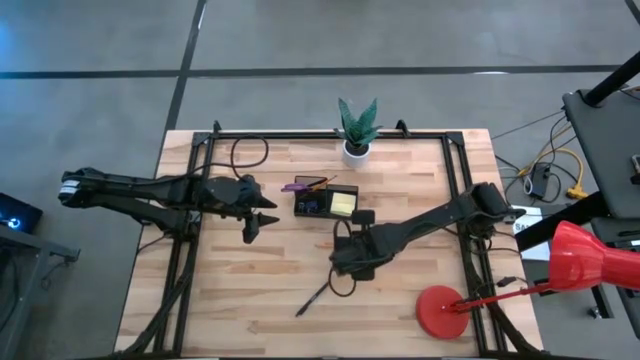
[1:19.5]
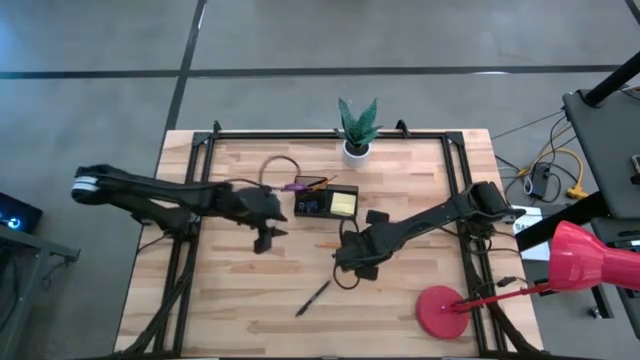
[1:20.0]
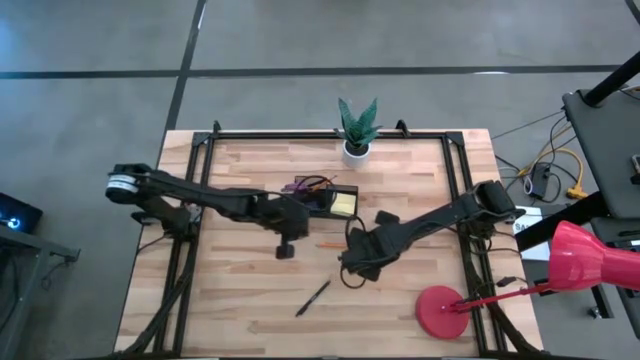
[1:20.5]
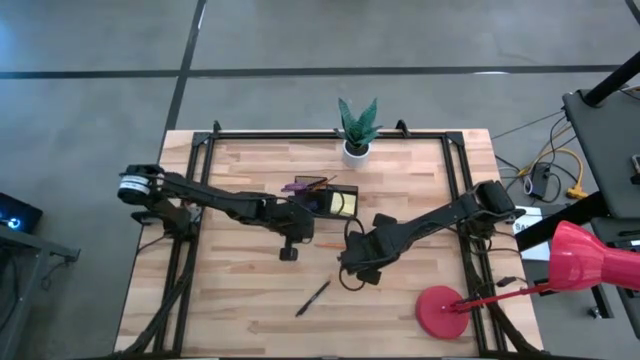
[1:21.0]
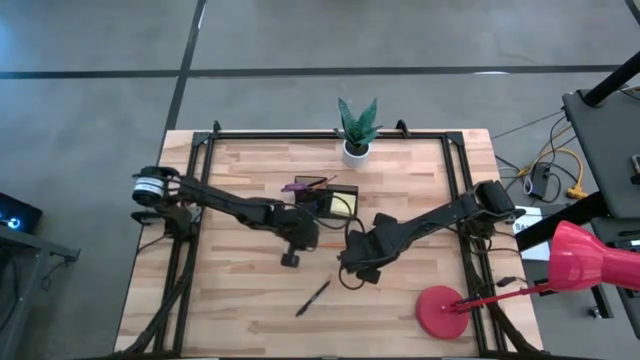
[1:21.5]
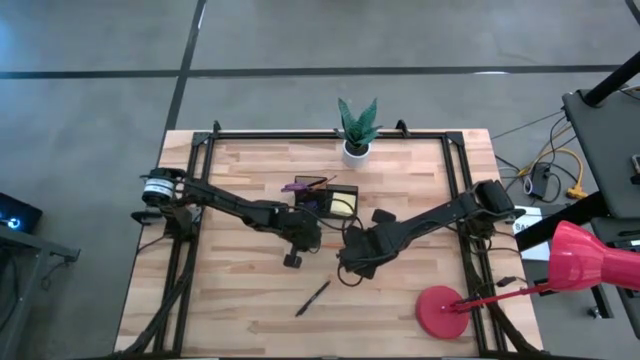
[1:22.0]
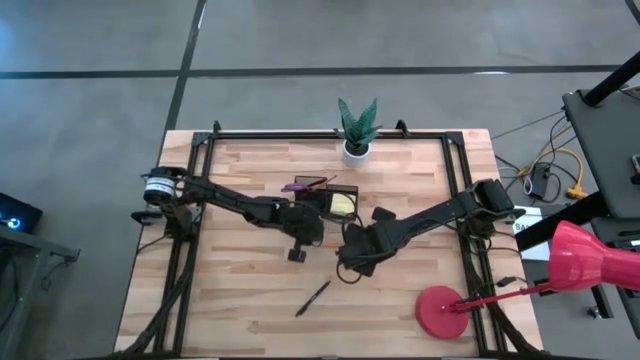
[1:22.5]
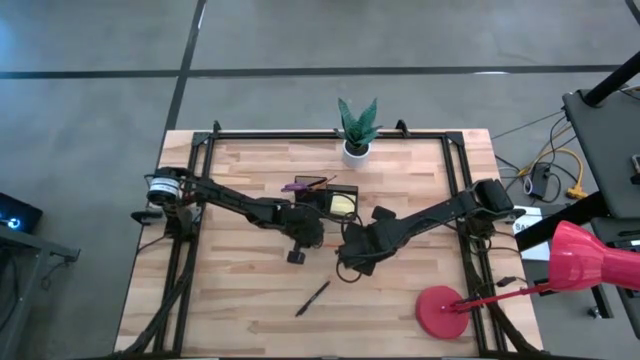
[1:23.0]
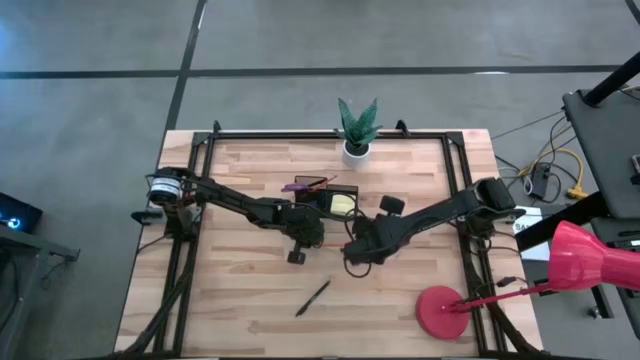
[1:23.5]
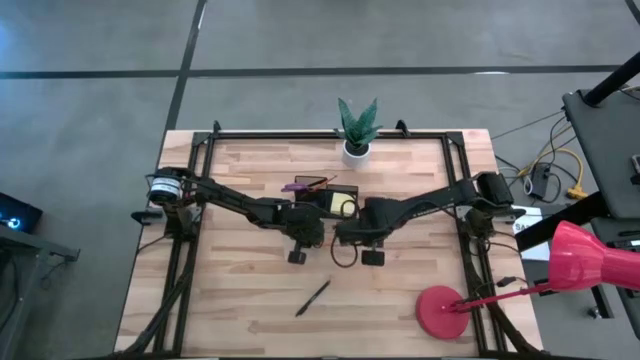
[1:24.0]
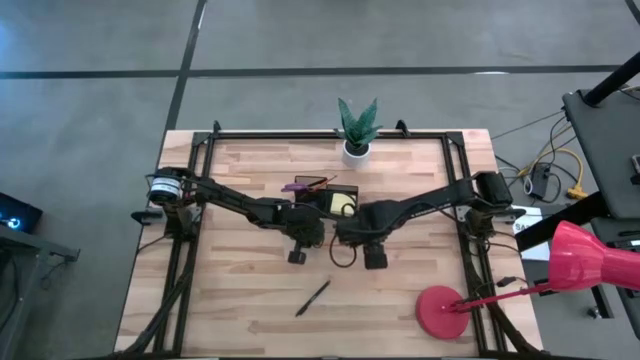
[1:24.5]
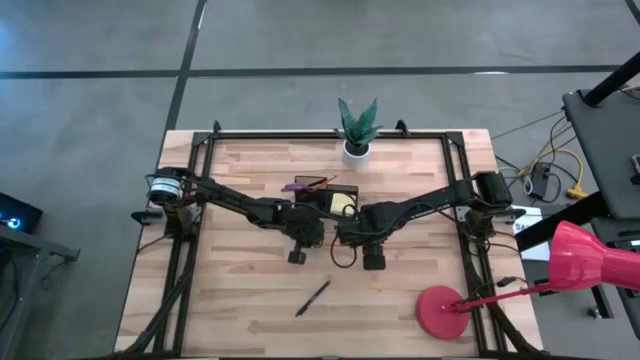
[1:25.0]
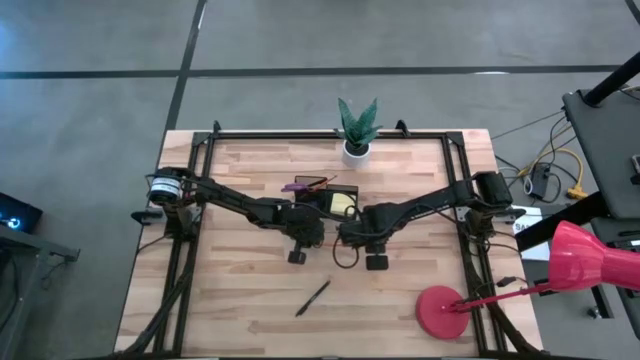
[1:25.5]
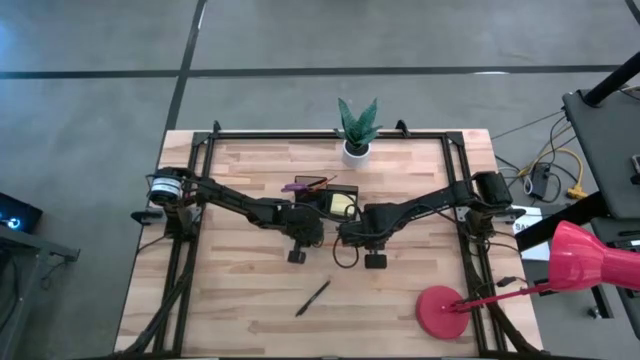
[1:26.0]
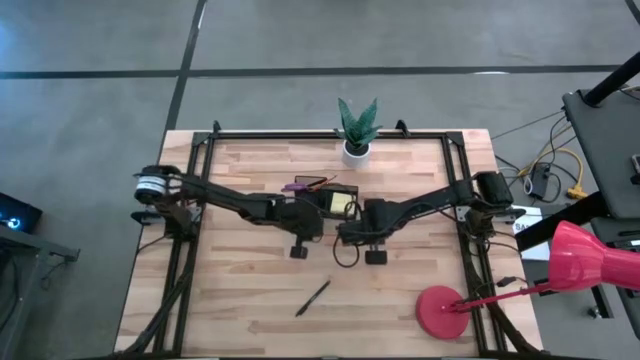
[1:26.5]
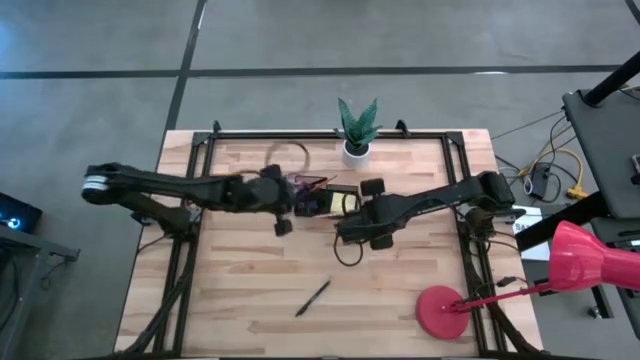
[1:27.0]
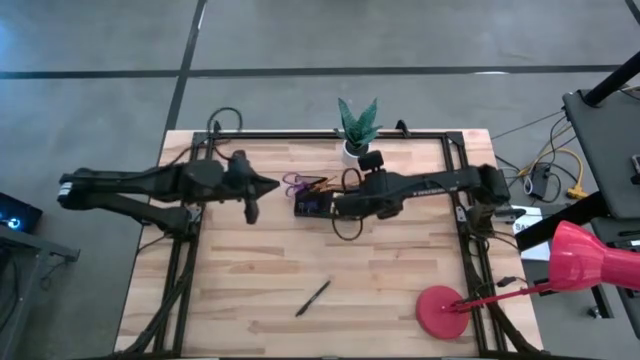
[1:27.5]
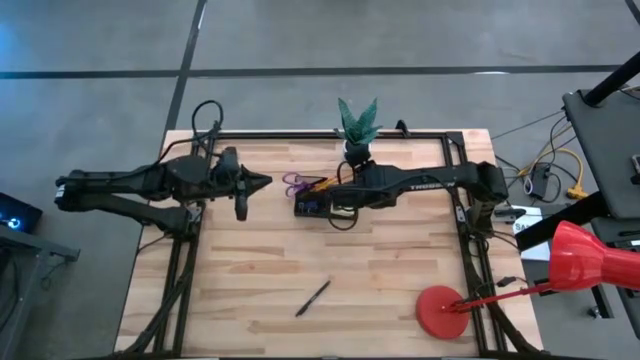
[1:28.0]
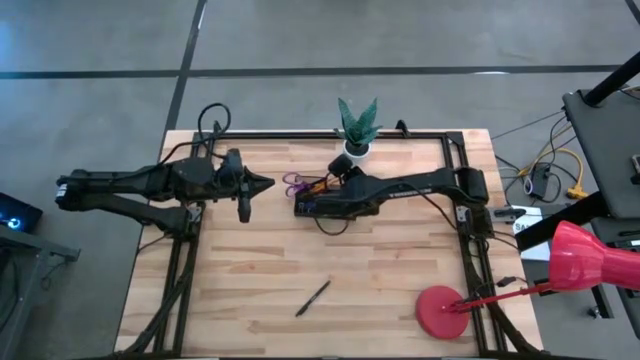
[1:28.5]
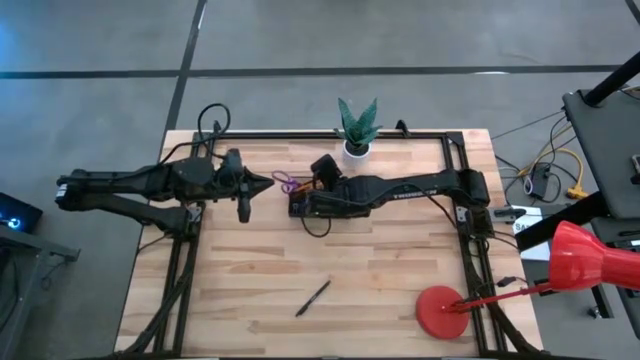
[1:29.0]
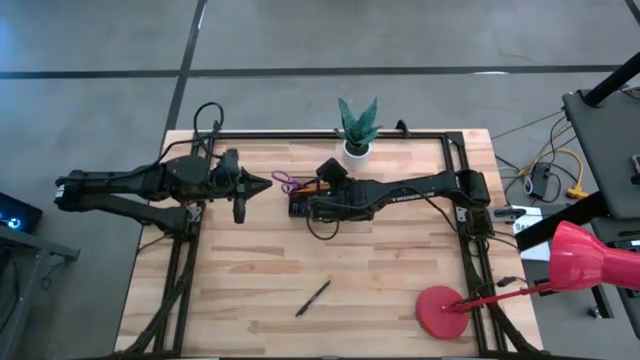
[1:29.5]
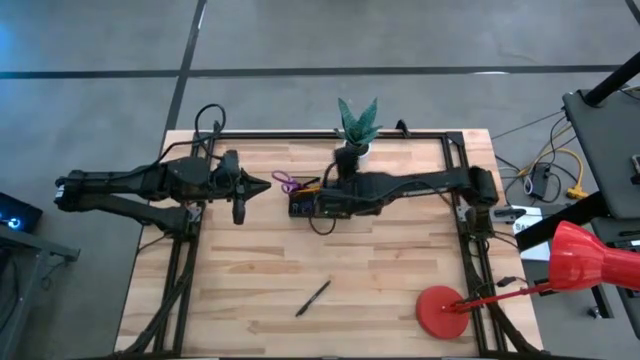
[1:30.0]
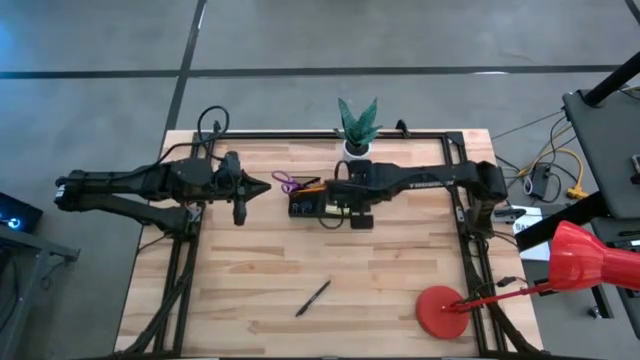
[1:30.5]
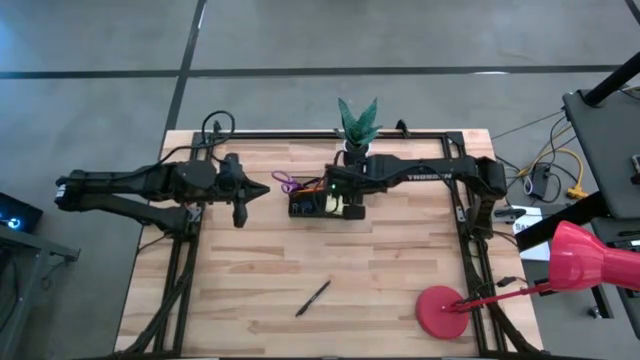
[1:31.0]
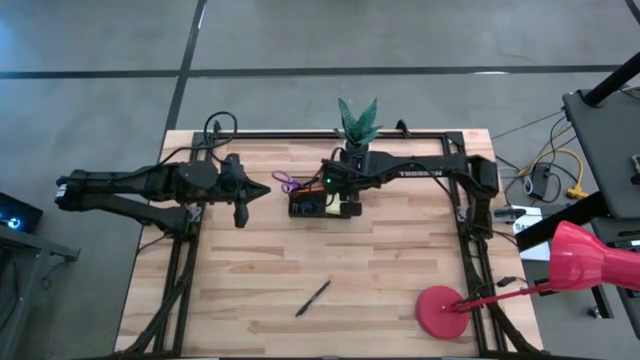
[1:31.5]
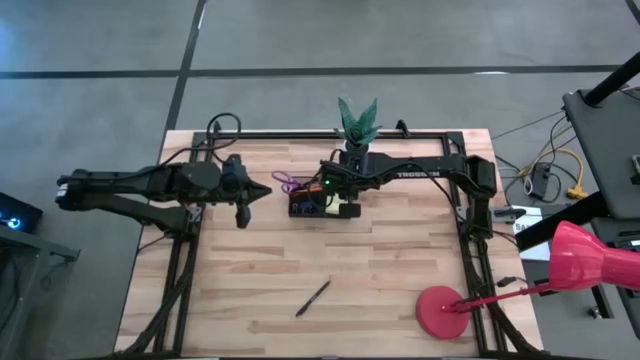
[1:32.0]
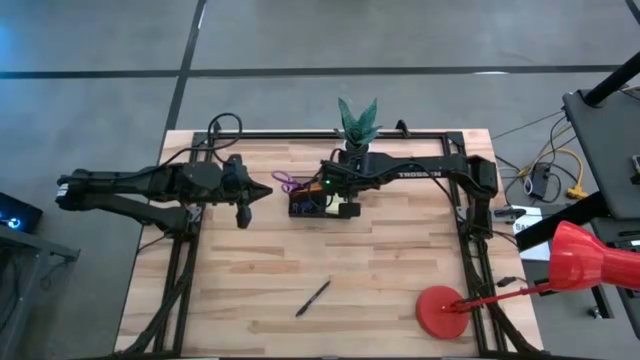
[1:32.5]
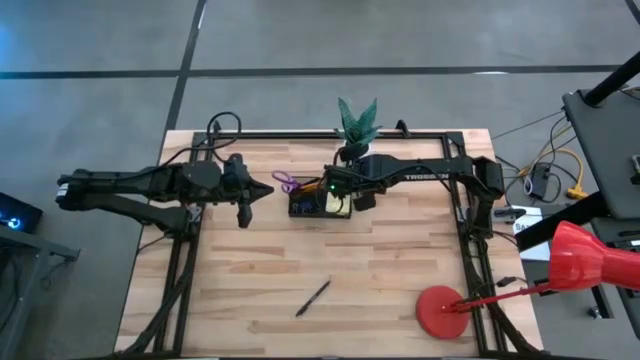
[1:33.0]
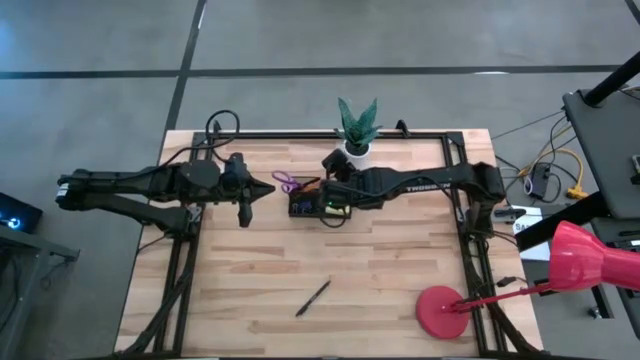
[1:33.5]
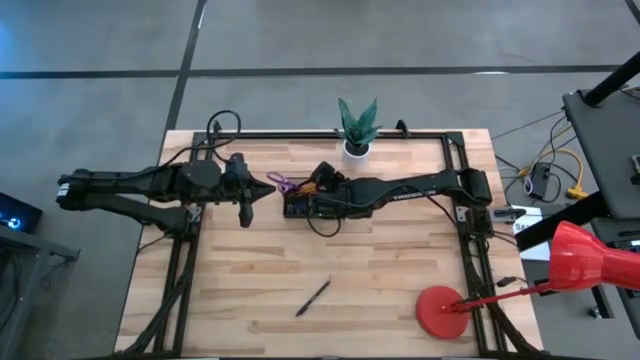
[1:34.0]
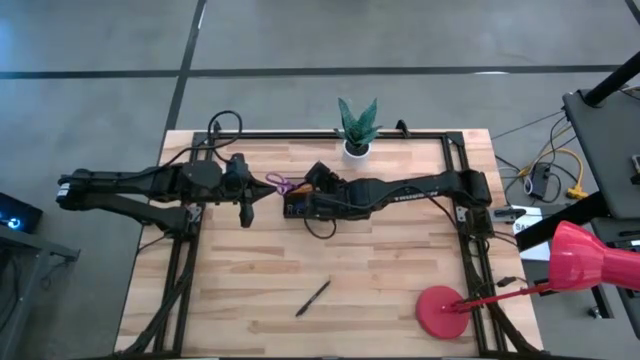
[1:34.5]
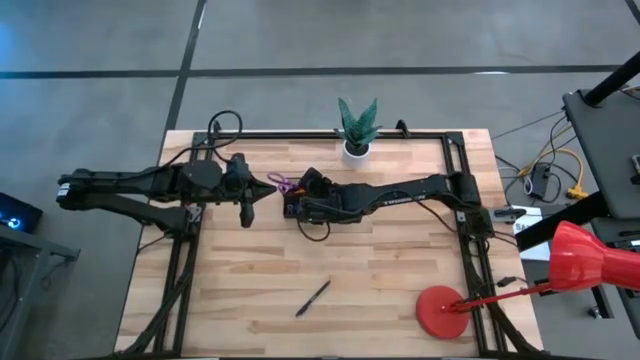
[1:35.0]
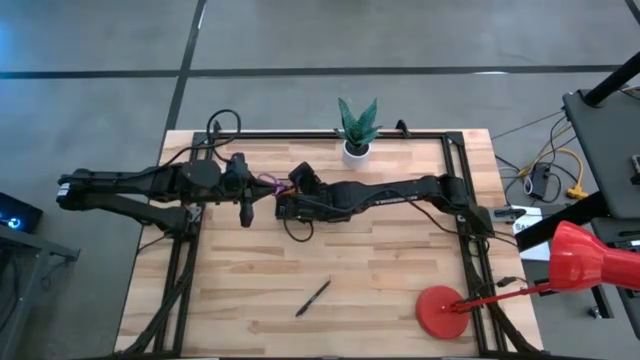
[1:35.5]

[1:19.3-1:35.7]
Task: Pick and place office supplies into organizer
Put the pencil into the desk organizer
